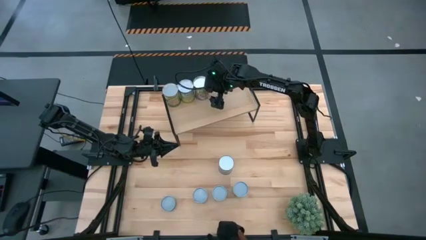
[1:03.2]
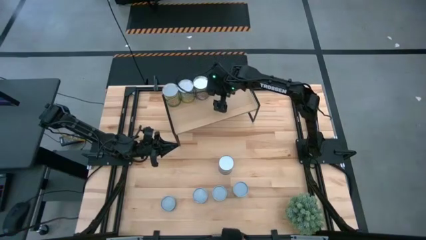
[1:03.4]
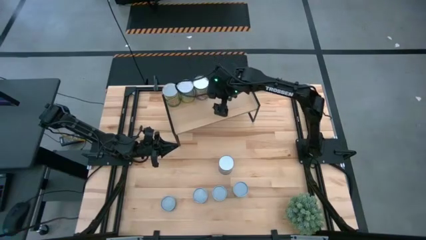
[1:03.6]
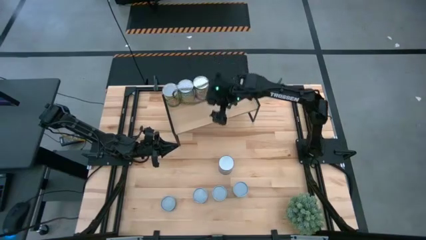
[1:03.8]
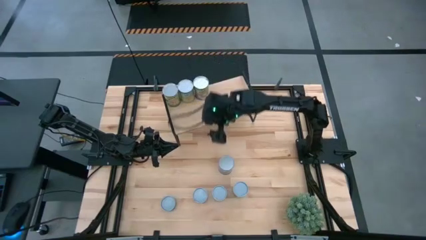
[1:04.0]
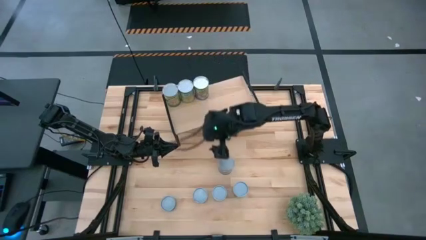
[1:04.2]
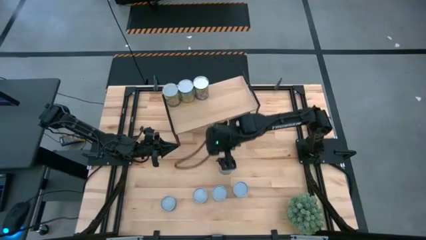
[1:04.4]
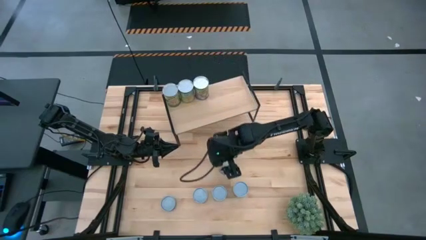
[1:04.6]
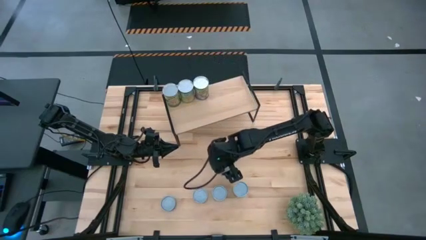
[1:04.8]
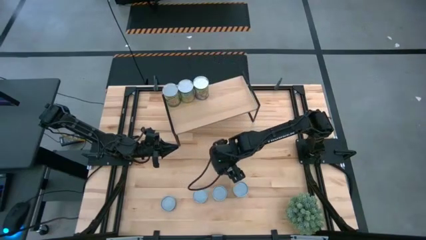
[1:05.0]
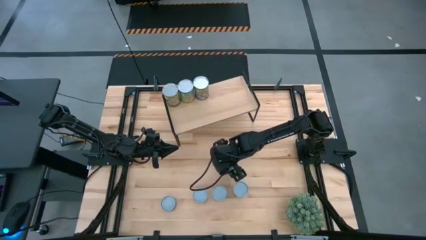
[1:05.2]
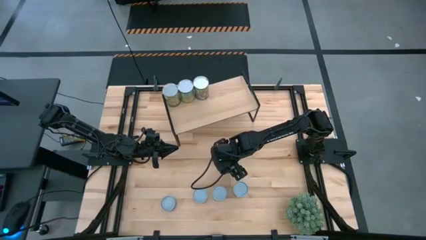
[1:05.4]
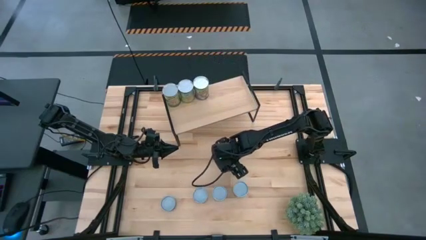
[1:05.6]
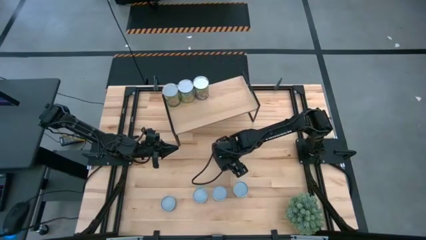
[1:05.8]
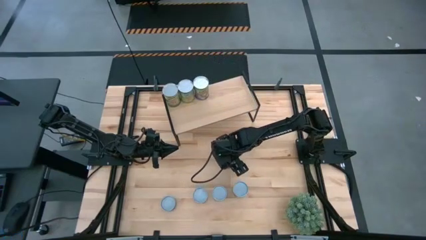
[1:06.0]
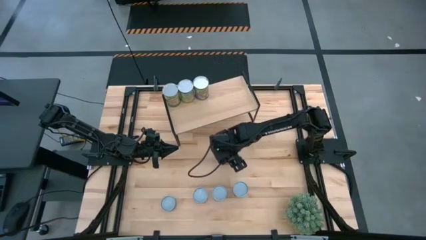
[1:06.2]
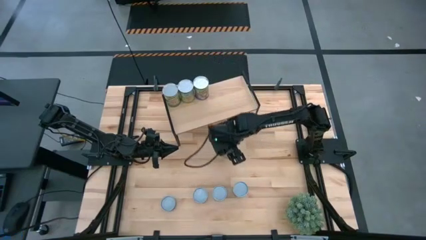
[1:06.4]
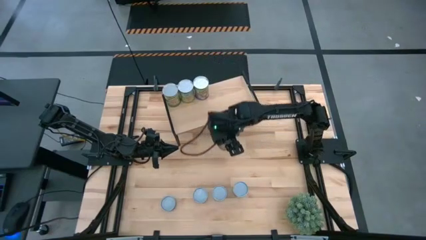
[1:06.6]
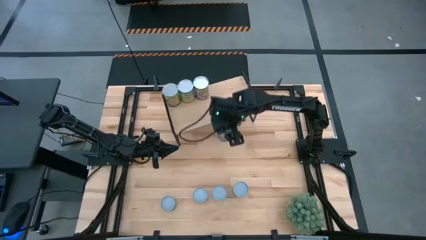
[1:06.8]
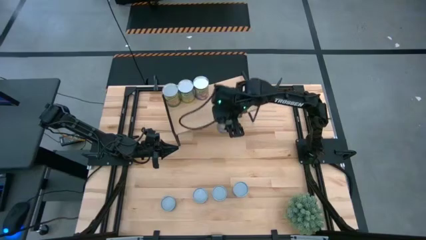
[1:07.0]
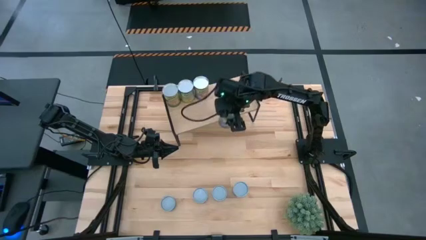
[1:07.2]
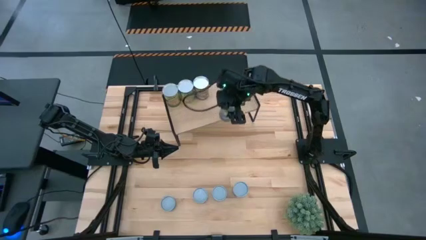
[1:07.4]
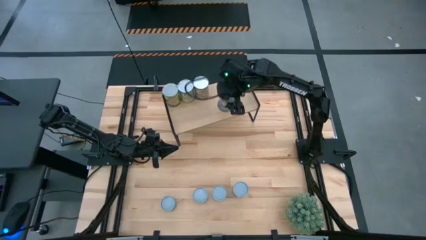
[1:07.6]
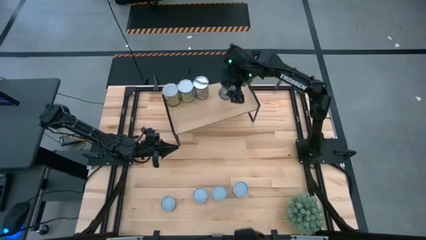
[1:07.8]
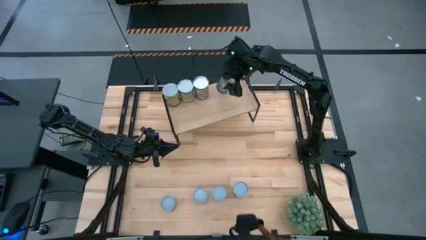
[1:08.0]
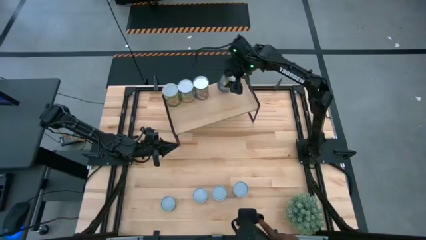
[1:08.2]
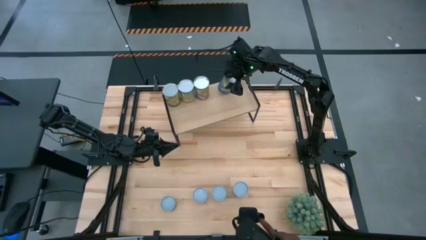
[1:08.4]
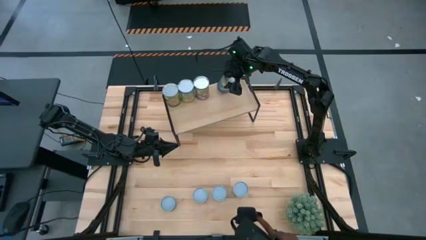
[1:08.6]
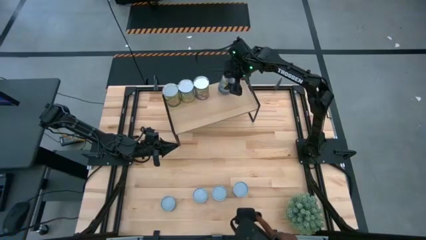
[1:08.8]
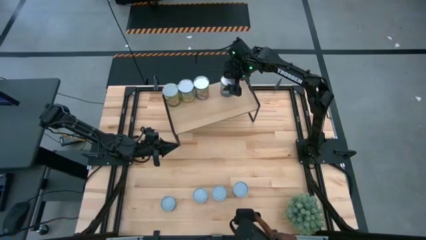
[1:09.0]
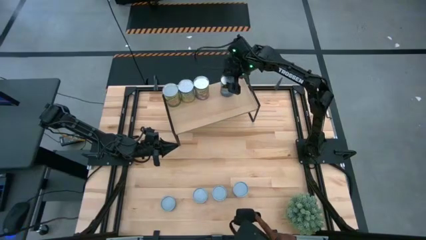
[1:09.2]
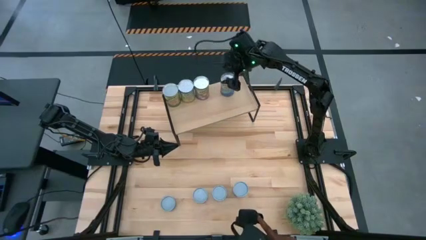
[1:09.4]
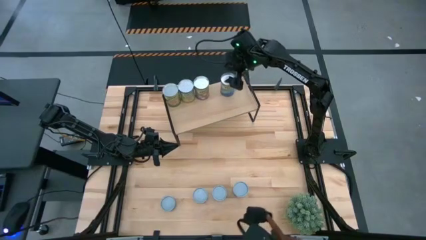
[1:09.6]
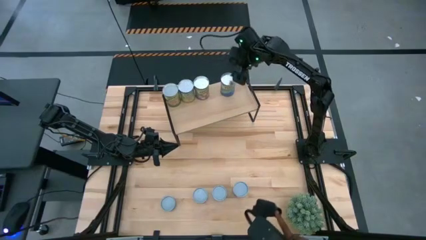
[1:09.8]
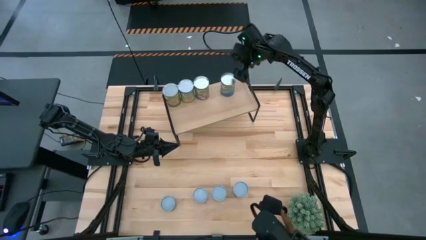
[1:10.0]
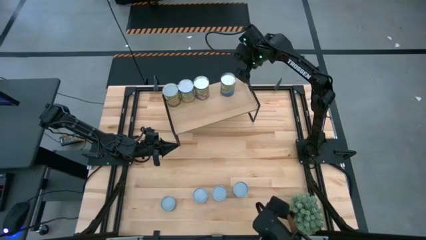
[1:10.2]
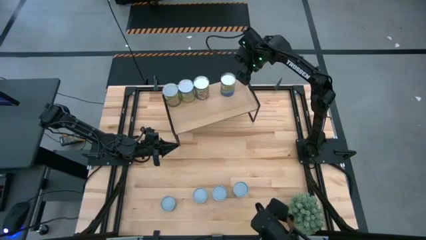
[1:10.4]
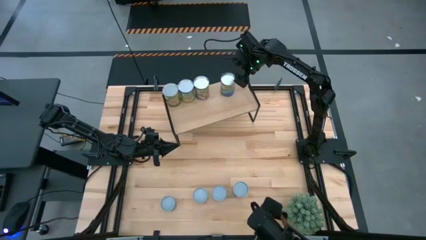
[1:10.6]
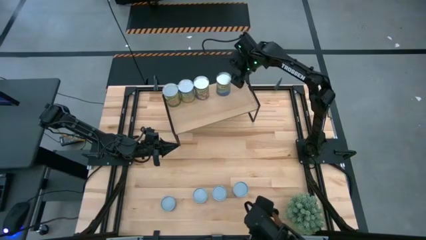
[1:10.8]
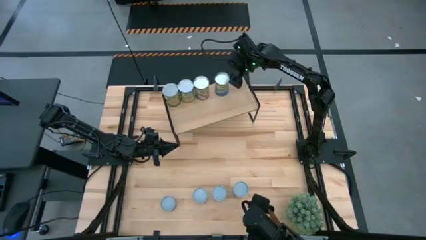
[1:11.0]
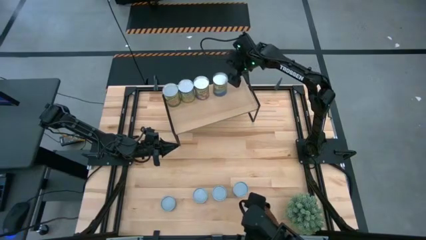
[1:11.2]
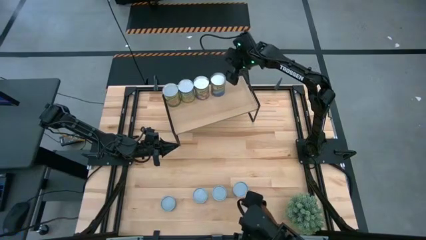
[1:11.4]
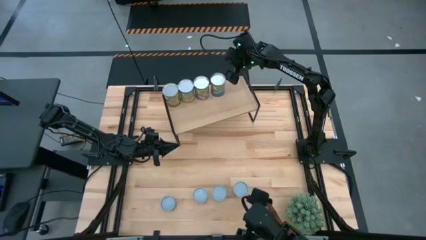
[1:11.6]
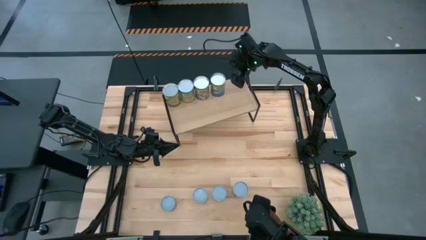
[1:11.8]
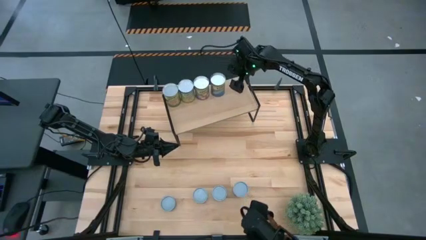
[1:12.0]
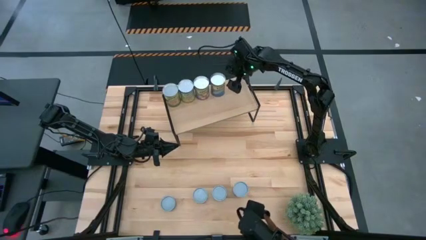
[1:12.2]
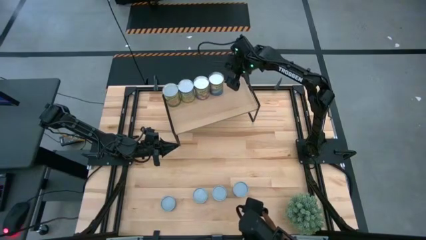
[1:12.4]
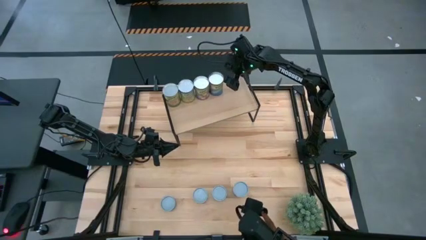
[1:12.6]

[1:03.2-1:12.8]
Task: Pick and place cans onto a shelf
Put the canned peas on the shelf

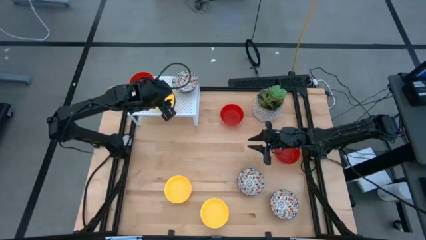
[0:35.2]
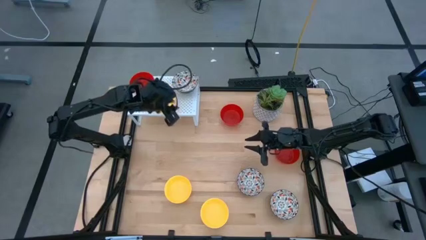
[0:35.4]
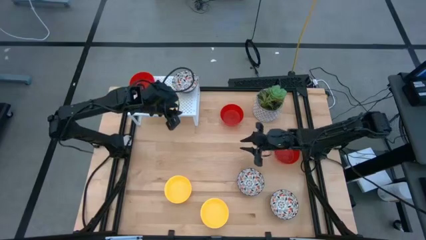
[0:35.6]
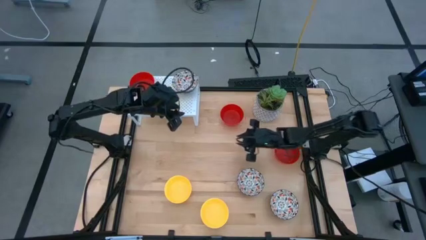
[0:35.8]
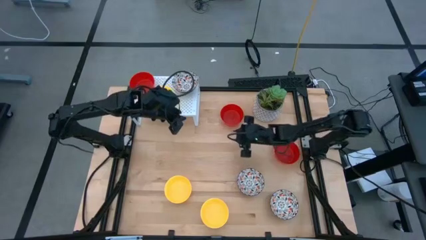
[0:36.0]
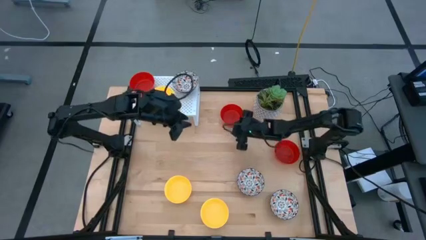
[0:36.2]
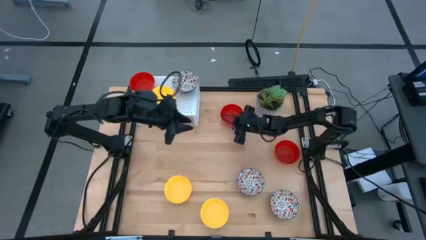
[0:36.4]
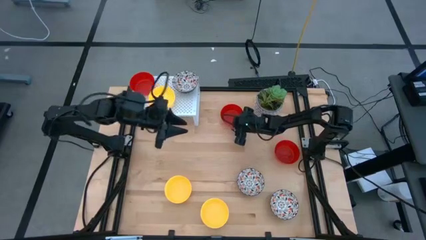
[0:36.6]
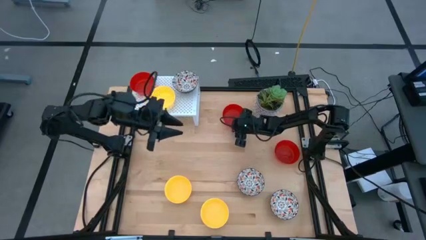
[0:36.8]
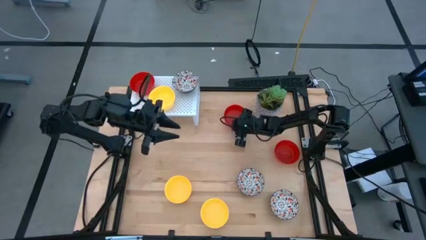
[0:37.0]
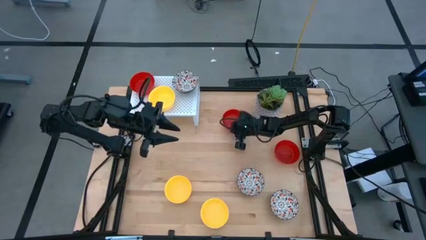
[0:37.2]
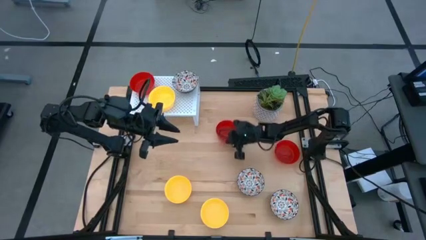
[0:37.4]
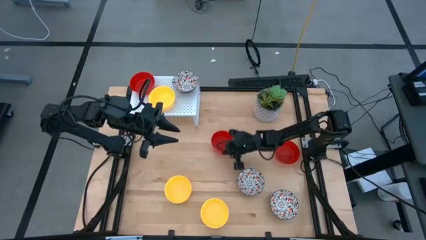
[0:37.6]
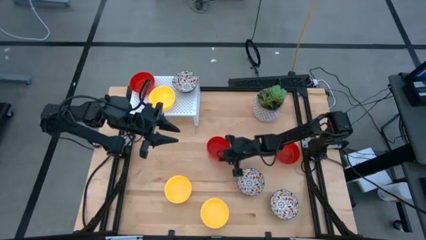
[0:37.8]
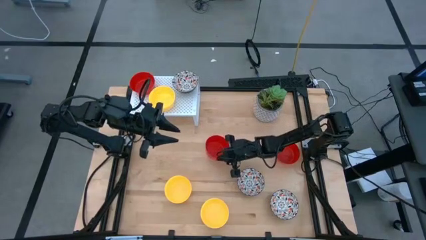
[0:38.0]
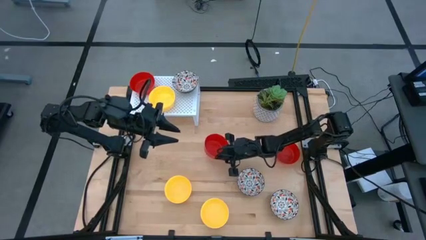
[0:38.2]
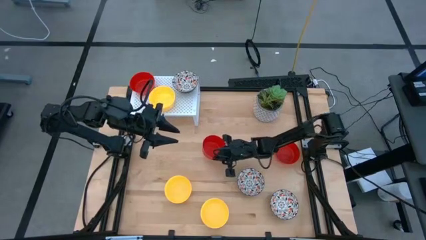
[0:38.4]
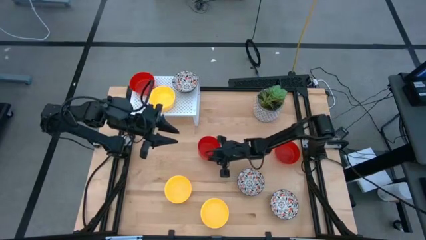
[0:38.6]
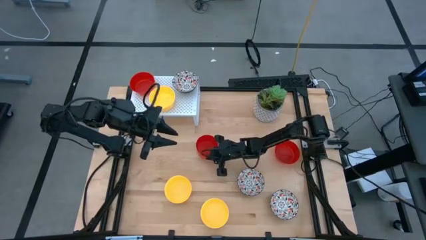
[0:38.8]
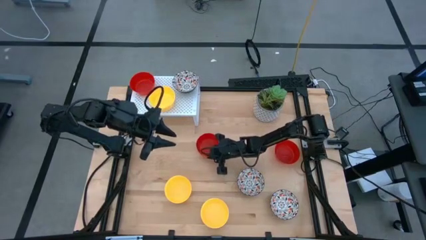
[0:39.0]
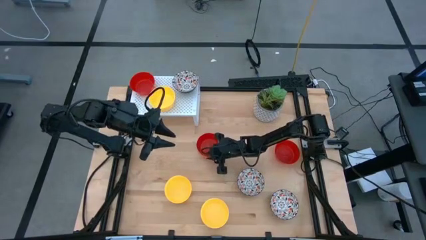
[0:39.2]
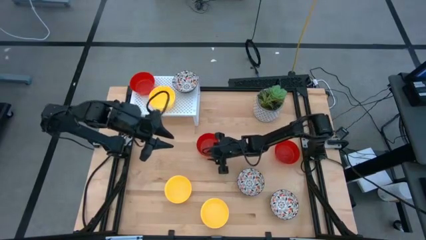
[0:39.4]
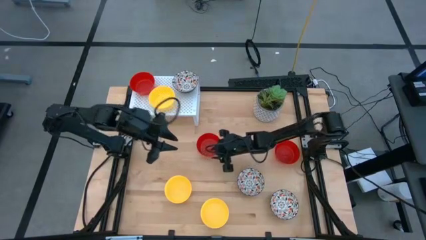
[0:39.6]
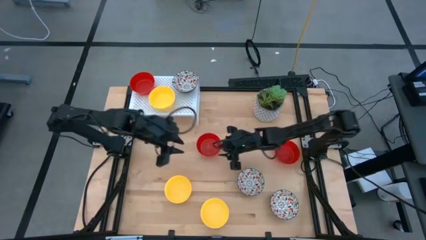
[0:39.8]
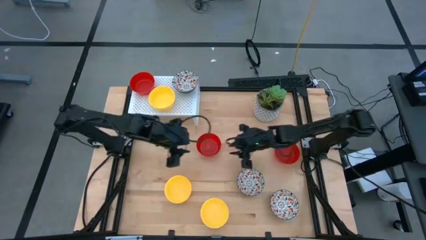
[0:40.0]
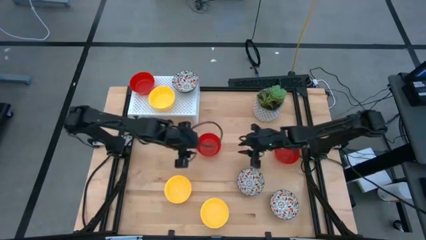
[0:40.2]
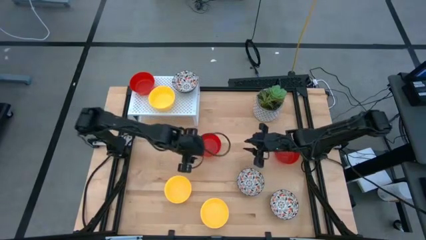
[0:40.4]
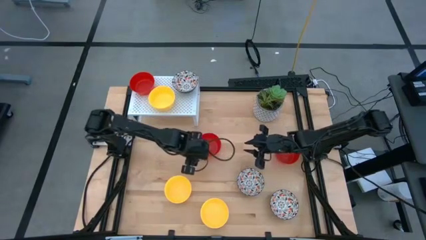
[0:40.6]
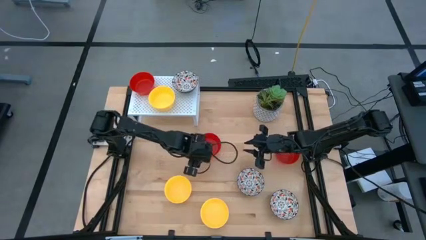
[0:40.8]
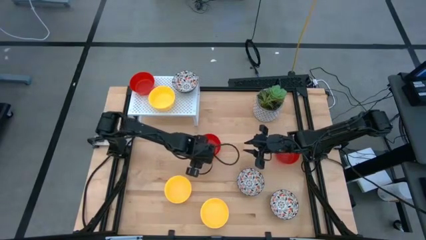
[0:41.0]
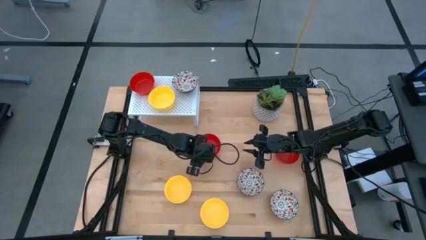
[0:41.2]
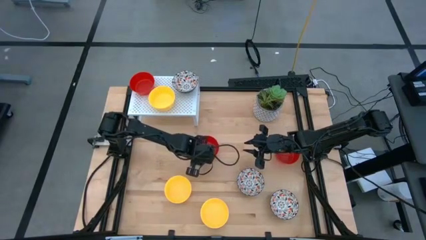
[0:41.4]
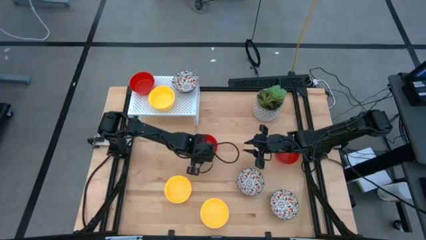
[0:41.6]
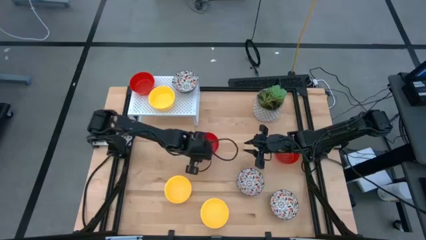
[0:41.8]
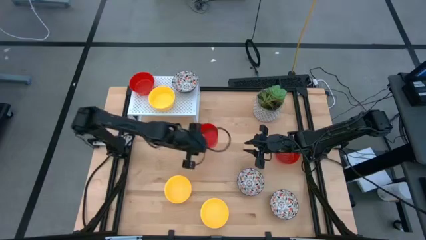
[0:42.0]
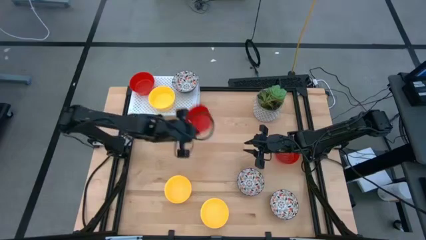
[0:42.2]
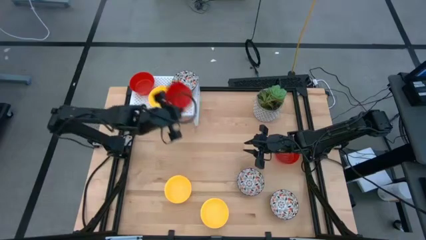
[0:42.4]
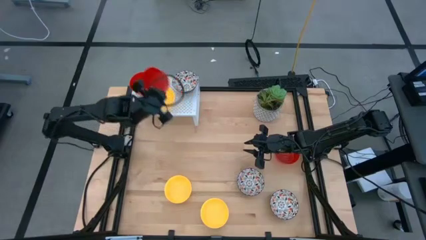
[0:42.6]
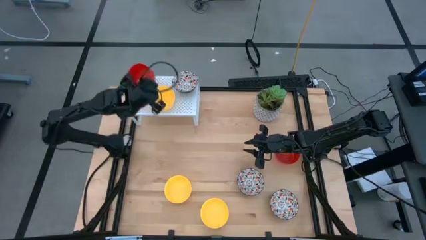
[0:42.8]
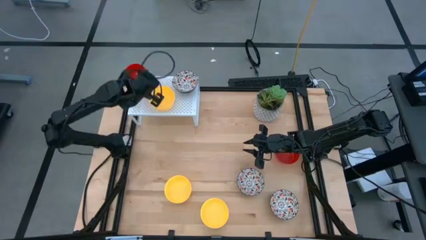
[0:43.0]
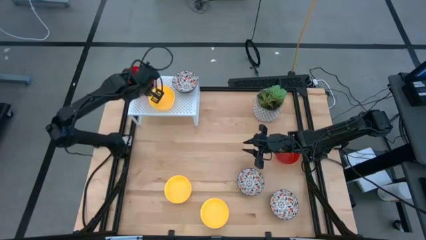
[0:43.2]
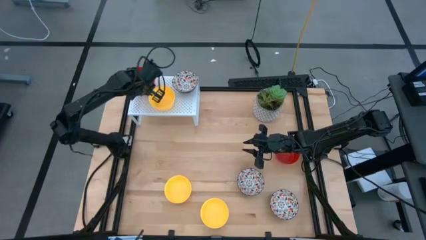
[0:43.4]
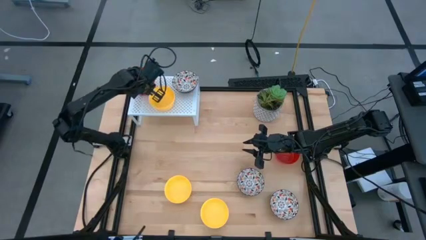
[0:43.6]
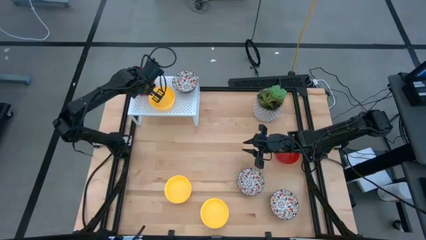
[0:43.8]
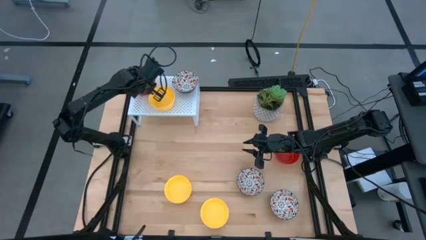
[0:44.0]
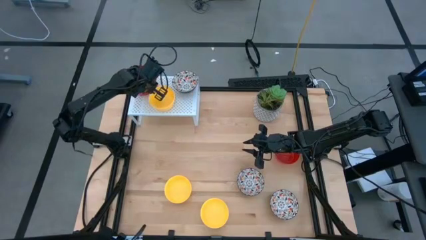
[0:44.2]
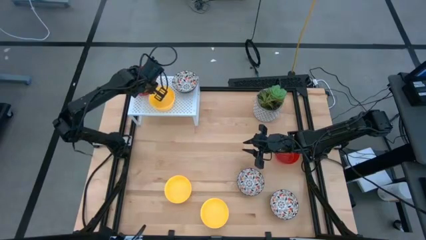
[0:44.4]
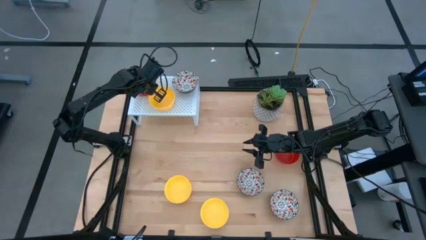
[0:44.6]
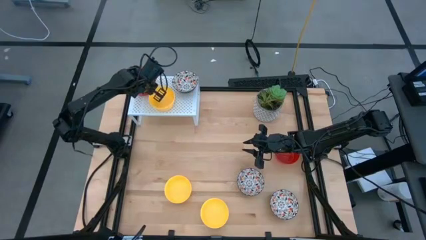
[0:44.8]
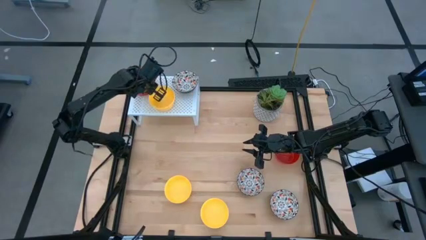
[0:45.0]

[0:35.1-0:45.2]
Task: Pick & Place Mini bowls
Stack the top red bowl on the red bowl on the shelf
